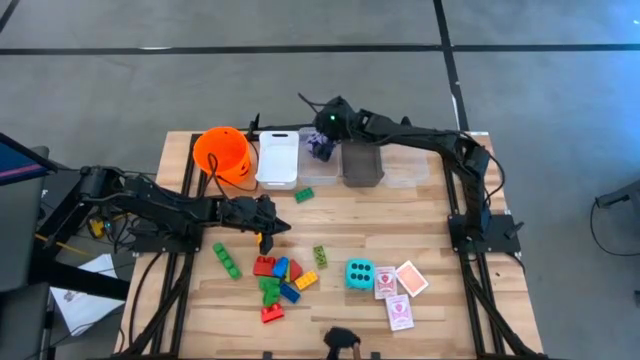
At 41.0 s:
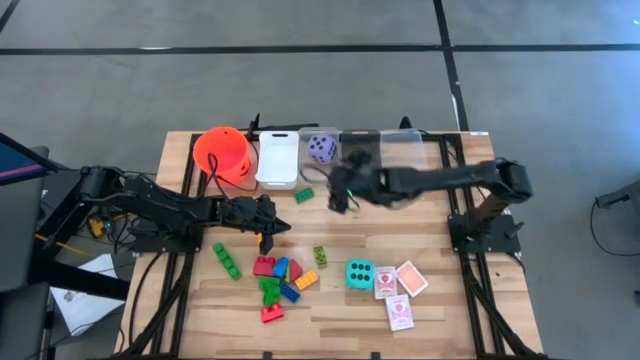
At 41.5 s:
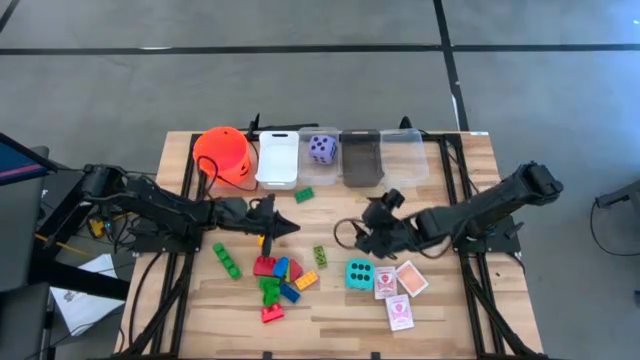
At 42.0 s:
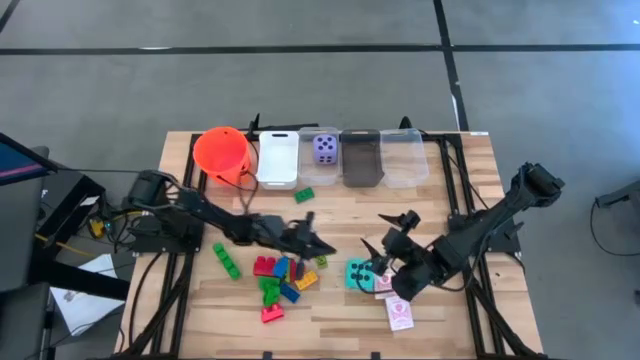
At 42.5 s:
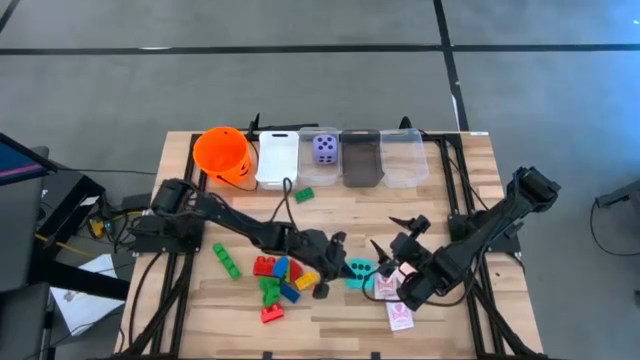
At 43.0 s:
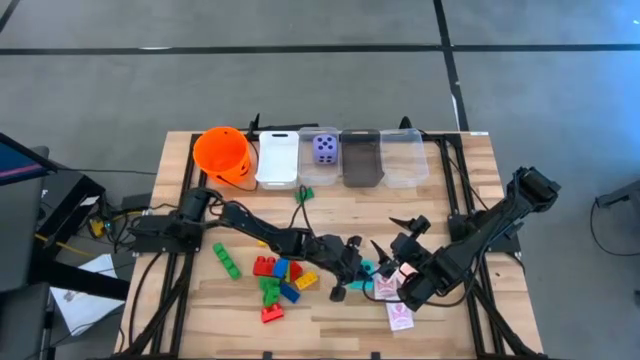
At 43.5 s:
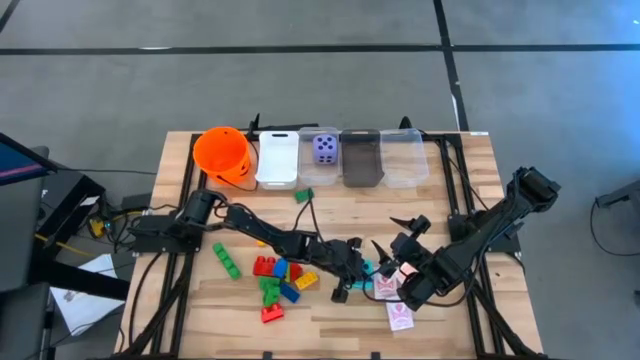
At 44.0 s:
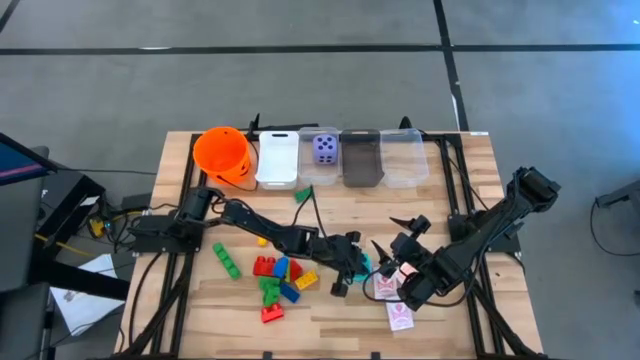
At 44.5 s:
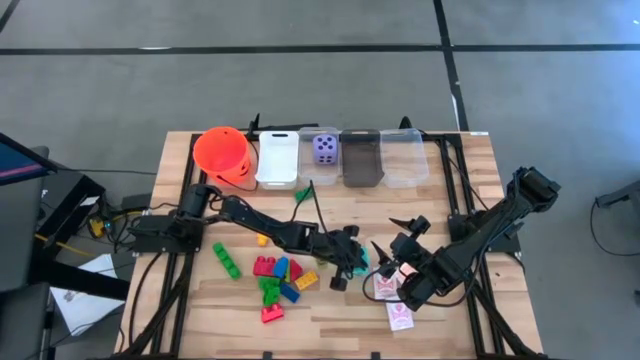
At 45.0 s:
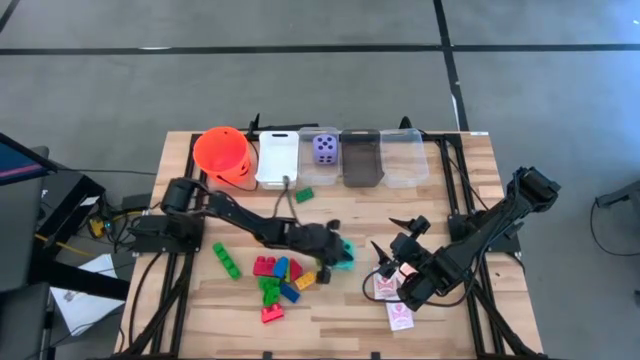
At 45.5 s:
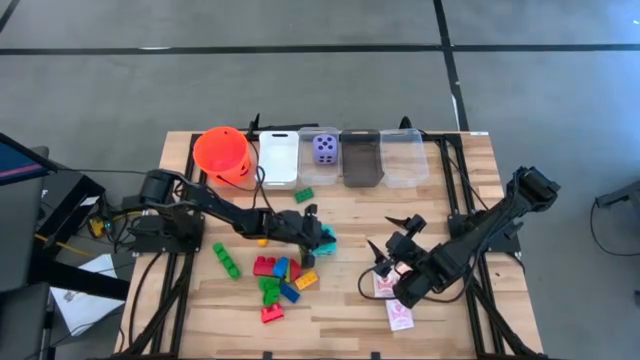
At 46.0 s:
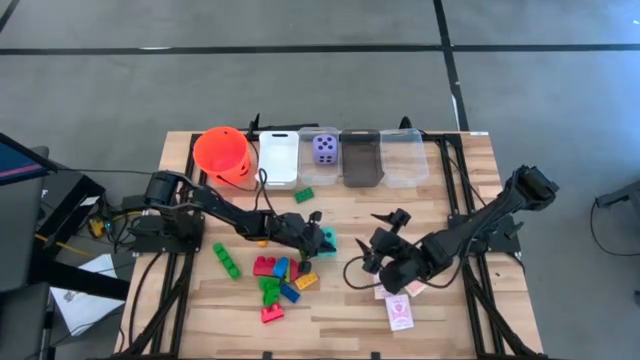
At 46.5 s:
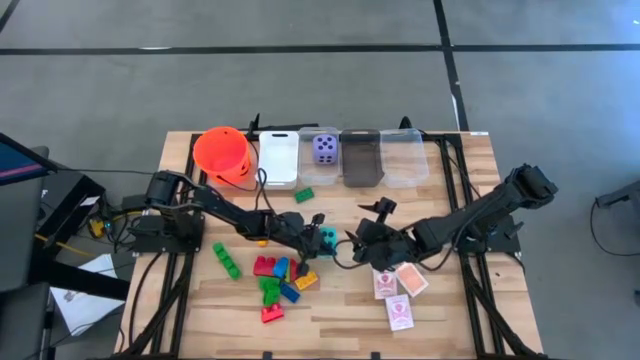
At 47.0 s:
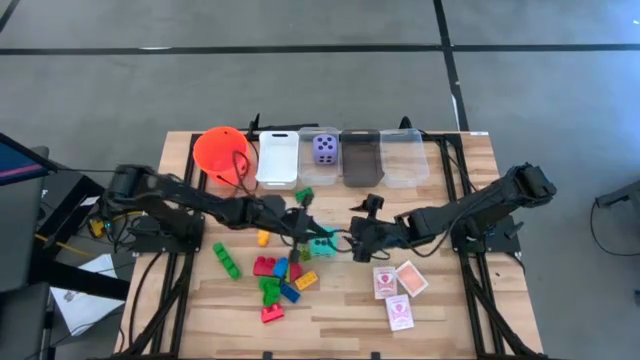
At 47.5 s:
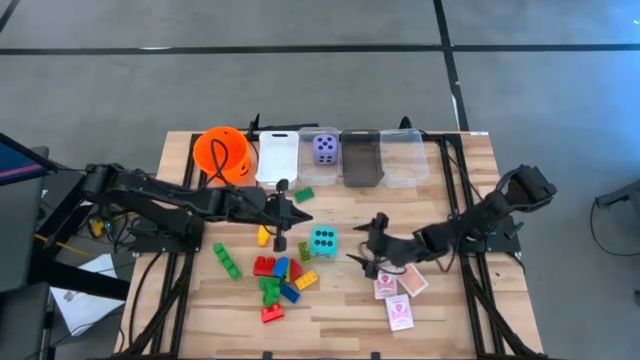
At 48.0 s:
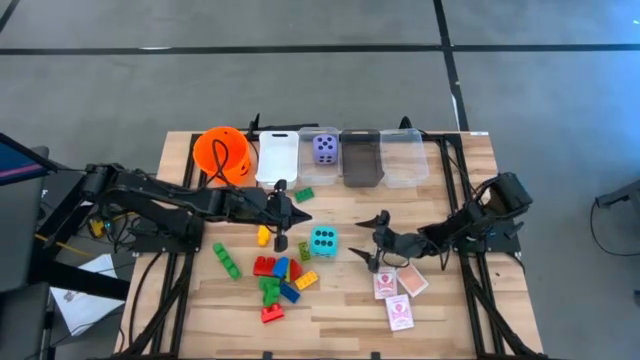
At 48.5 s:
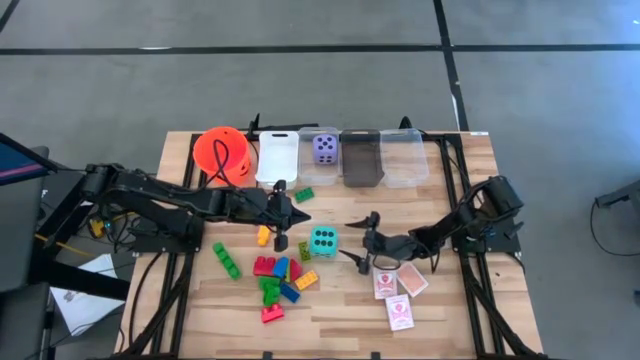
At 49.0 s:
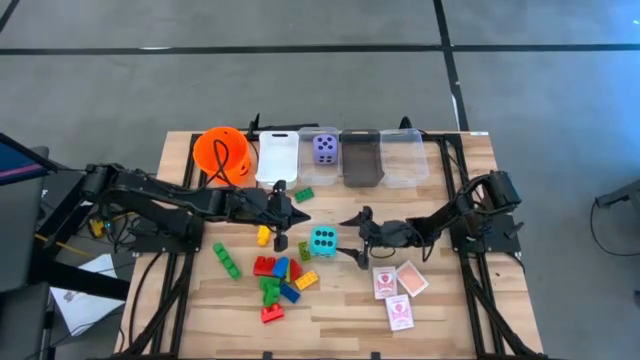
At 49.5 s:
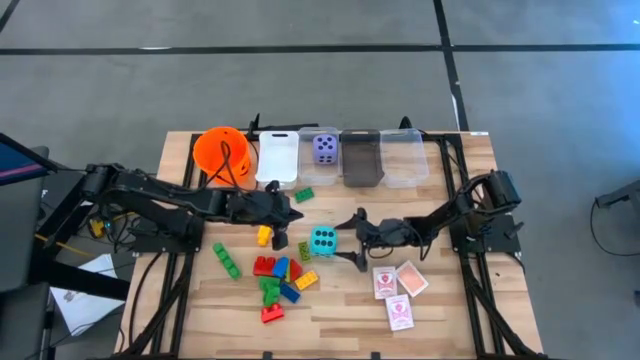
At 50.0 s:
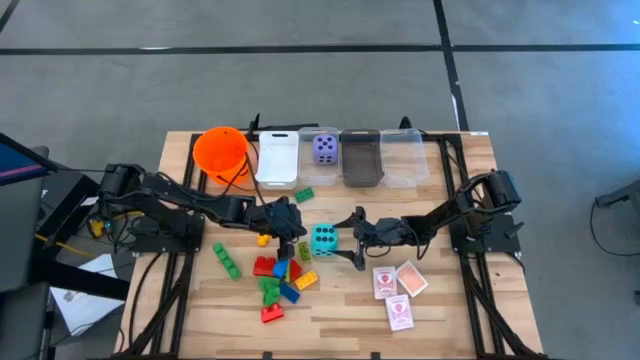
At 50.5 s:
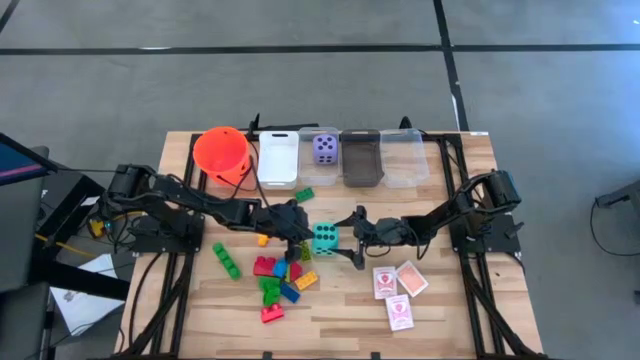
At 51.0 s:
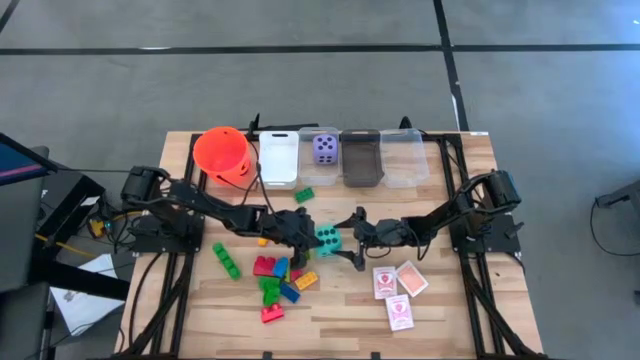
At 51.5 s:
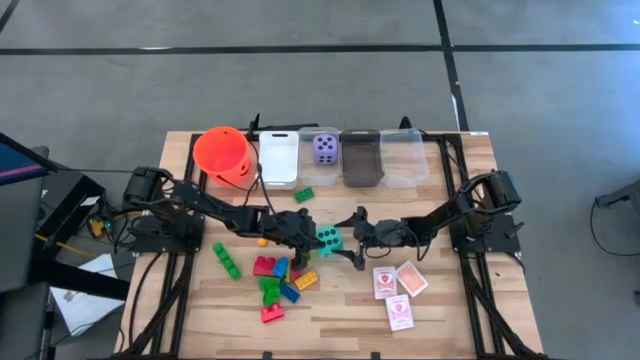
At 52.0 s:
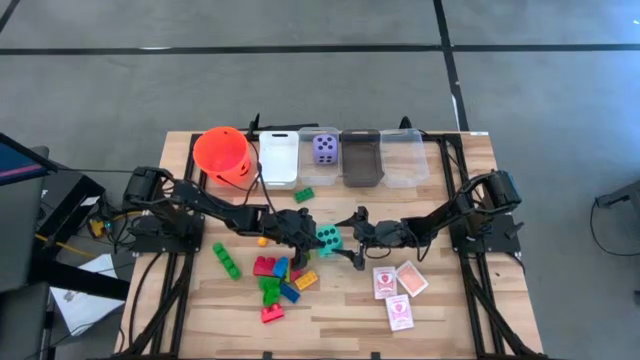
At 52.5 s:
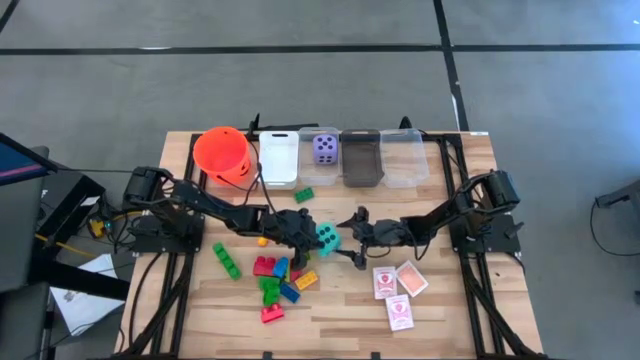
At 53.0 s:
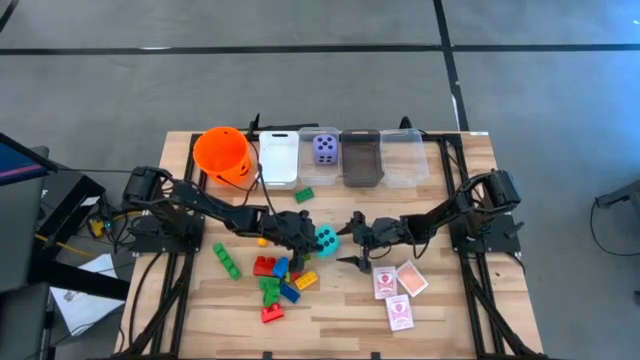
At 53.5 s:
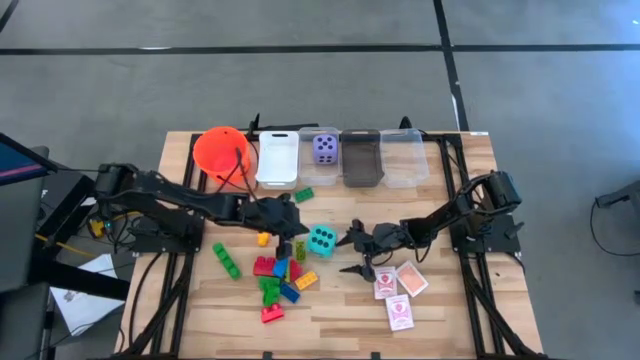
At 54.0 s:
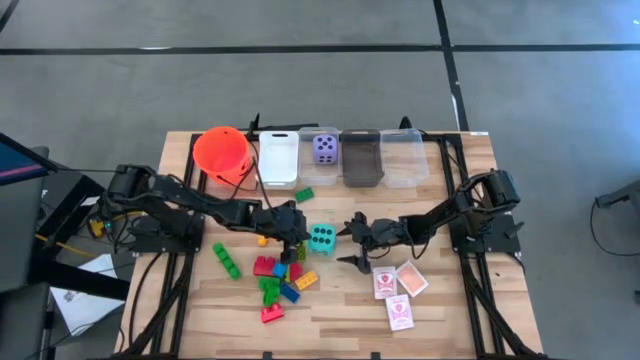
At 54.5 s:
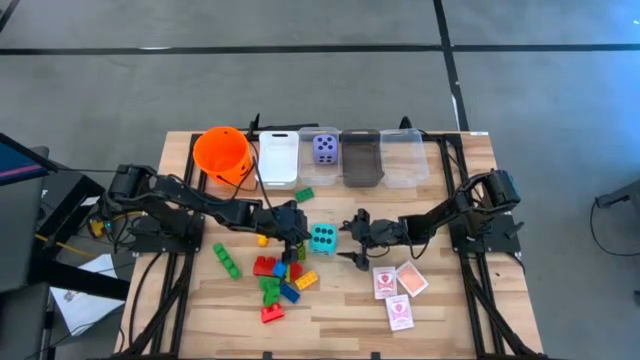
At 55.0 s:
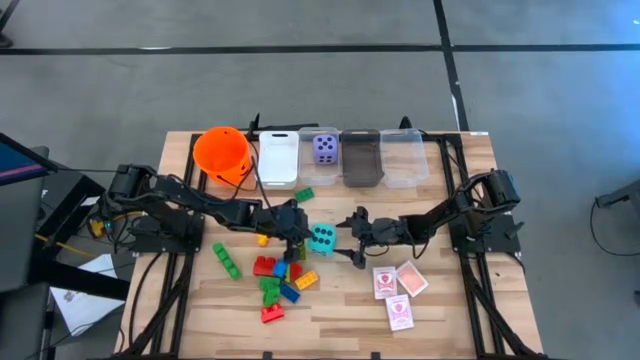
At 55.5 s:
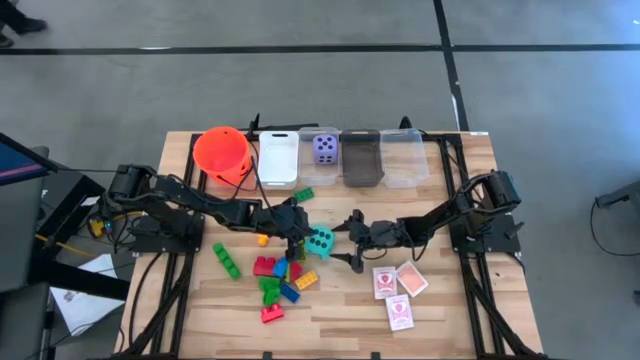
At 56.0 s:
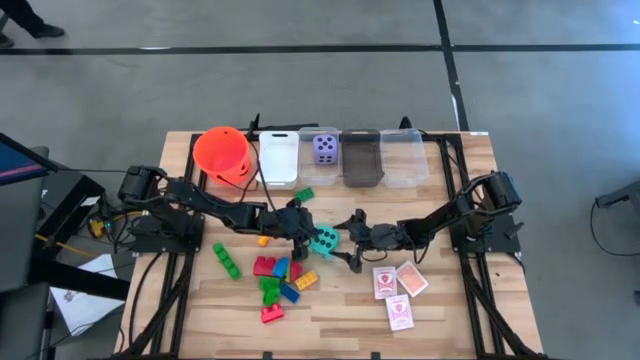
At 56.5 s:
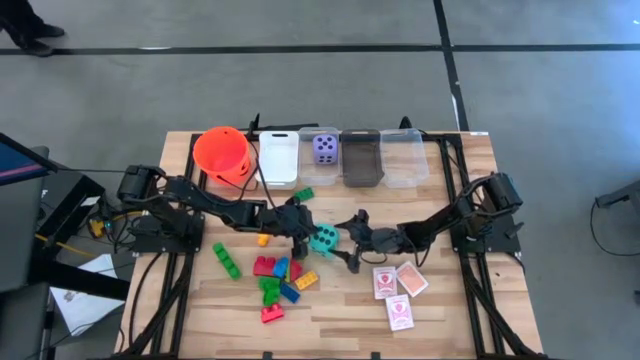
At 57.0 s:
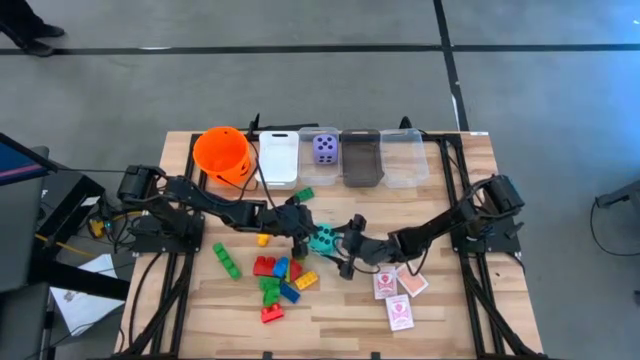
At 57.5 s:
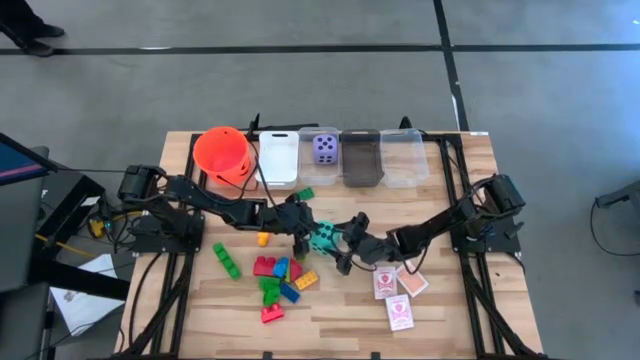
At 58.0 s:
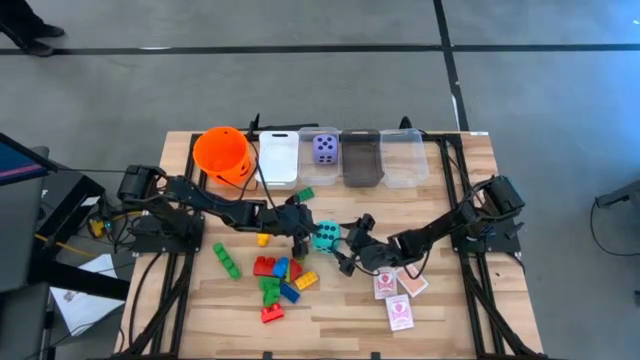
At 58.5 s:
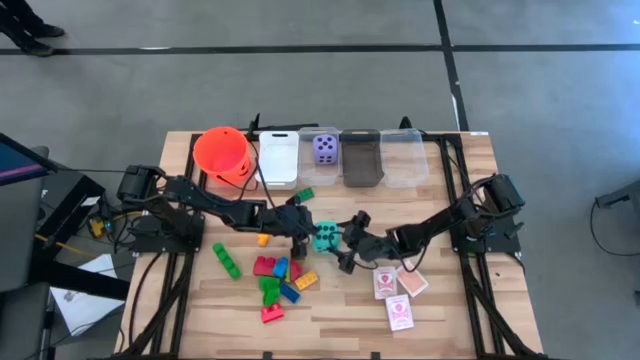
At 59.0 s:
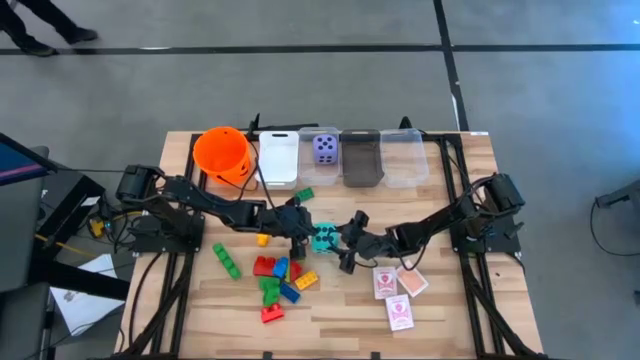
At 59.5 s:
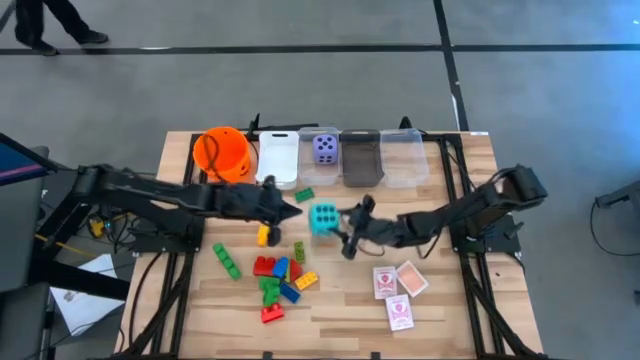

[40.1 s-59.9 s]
Task: Pick & Place Toys
Put the blue dice into the left transparent bin
